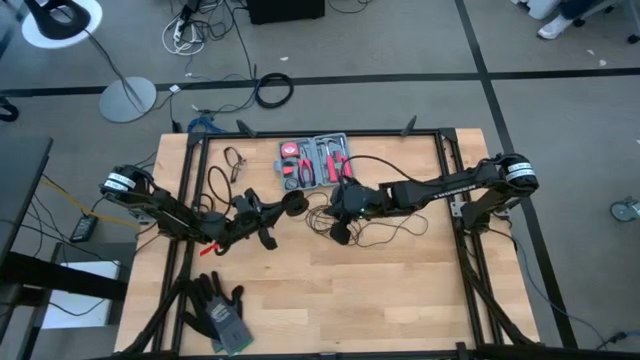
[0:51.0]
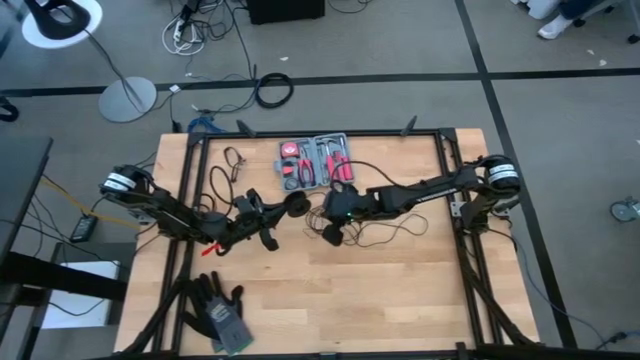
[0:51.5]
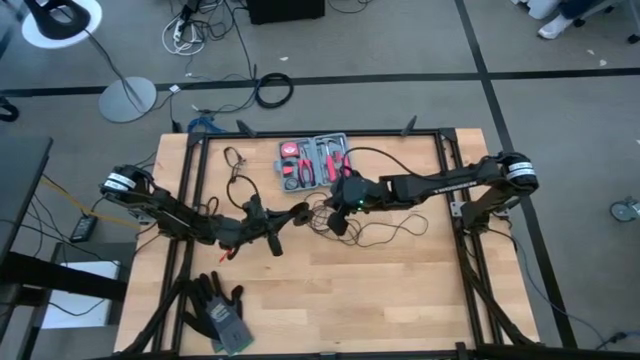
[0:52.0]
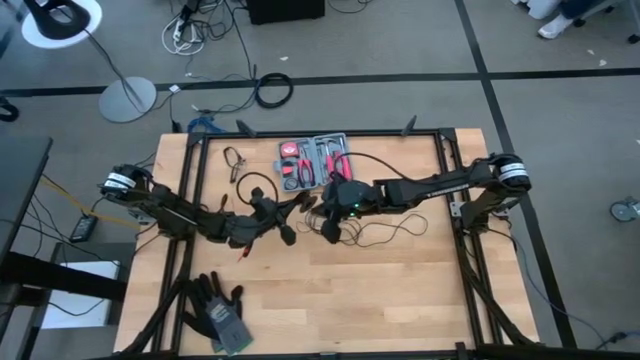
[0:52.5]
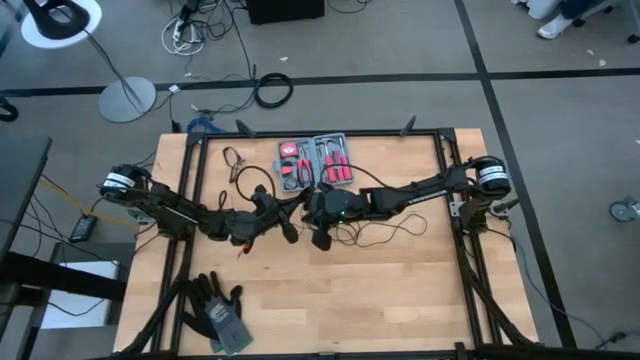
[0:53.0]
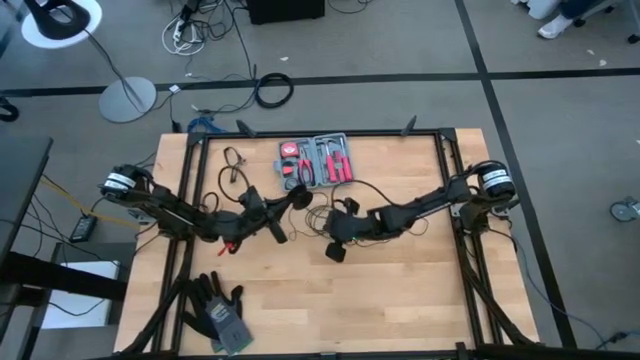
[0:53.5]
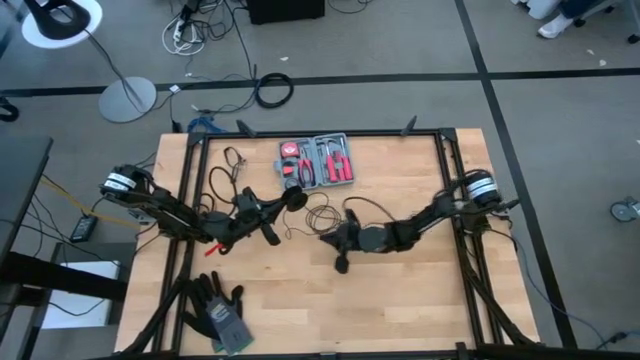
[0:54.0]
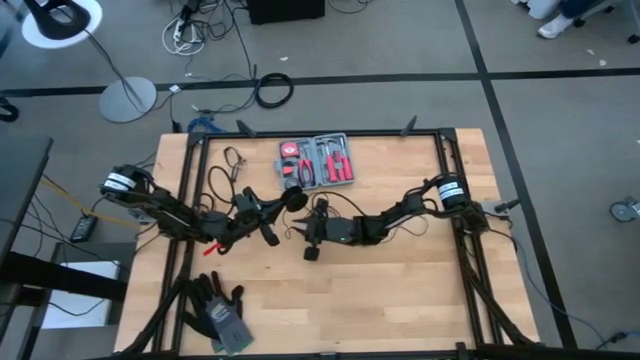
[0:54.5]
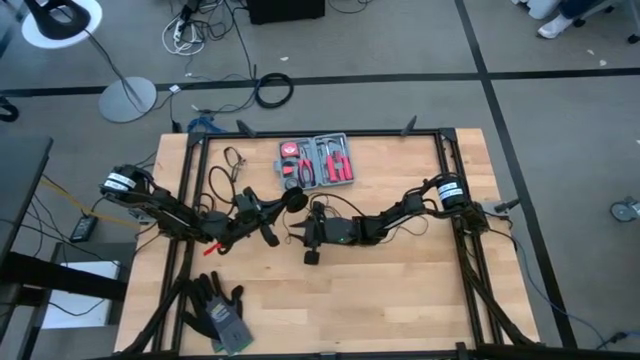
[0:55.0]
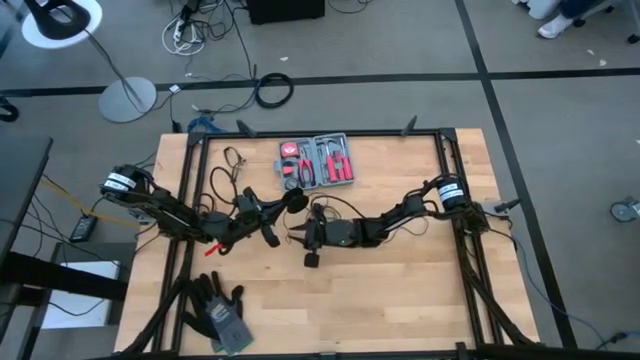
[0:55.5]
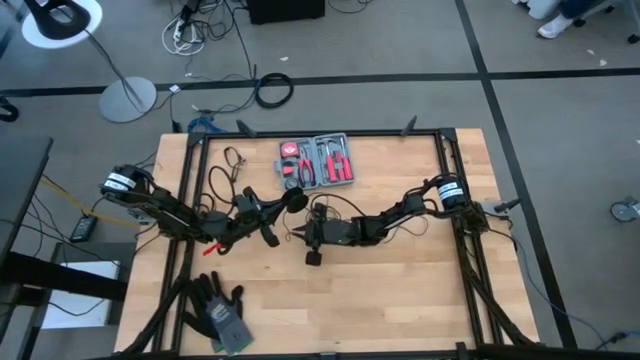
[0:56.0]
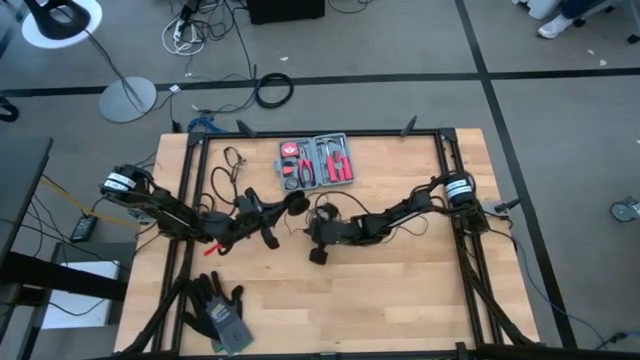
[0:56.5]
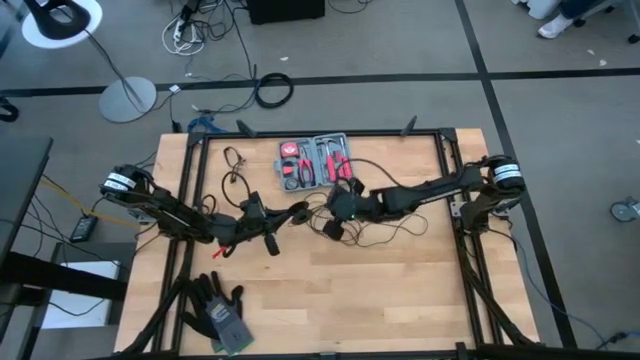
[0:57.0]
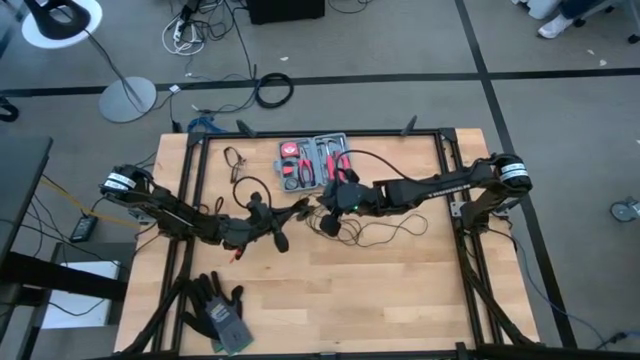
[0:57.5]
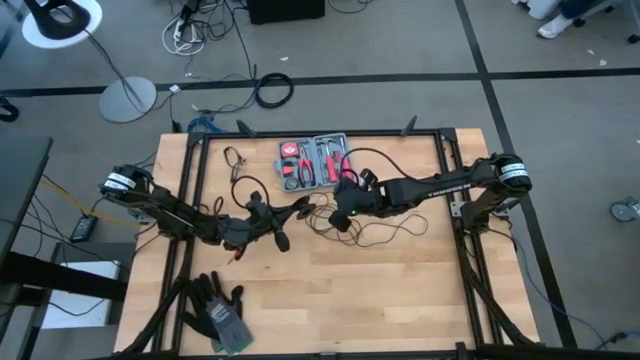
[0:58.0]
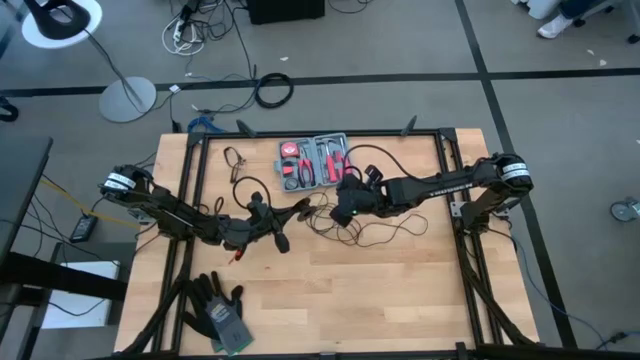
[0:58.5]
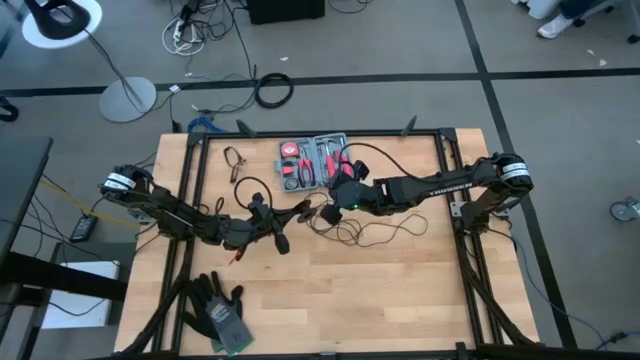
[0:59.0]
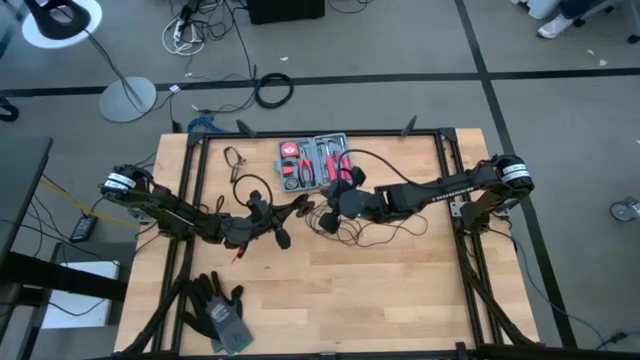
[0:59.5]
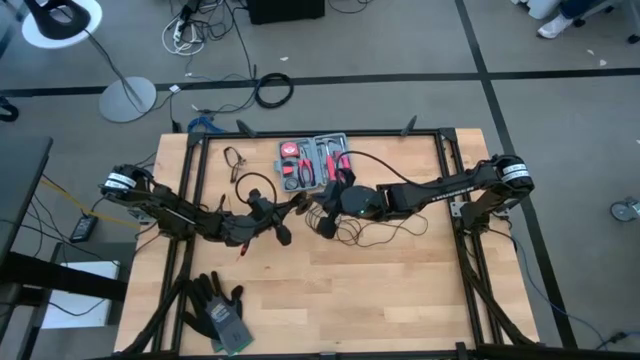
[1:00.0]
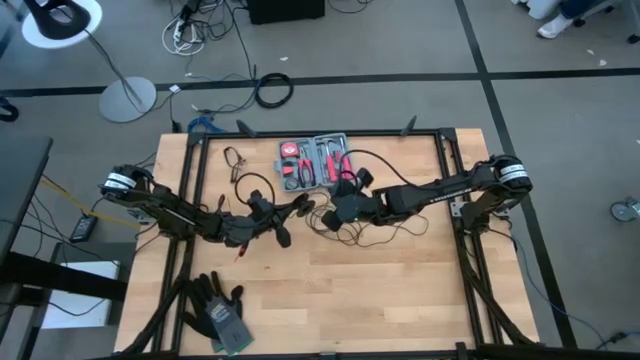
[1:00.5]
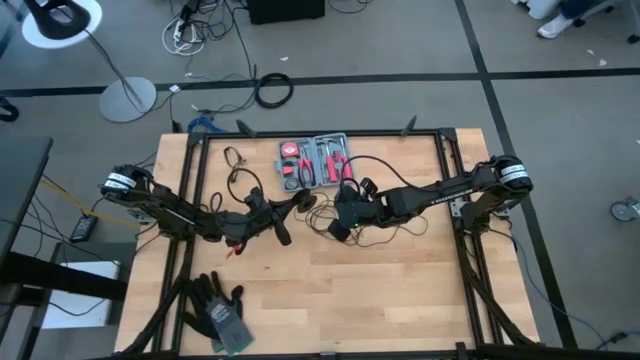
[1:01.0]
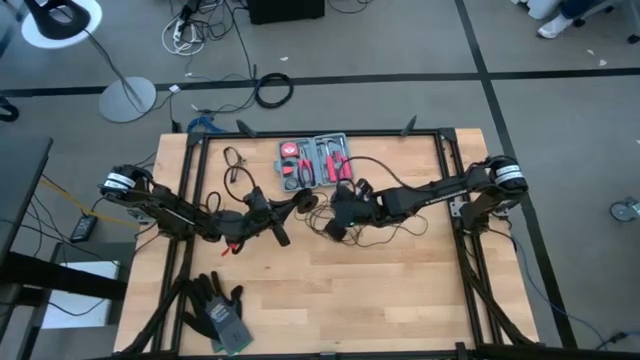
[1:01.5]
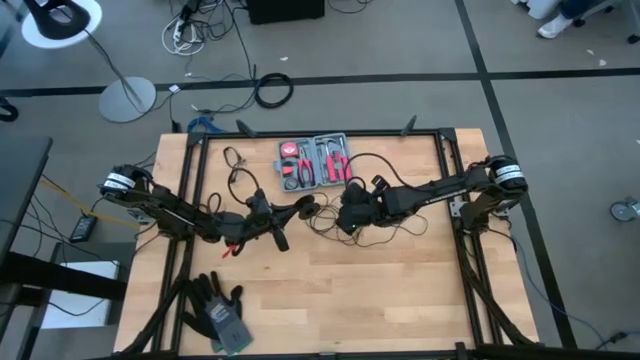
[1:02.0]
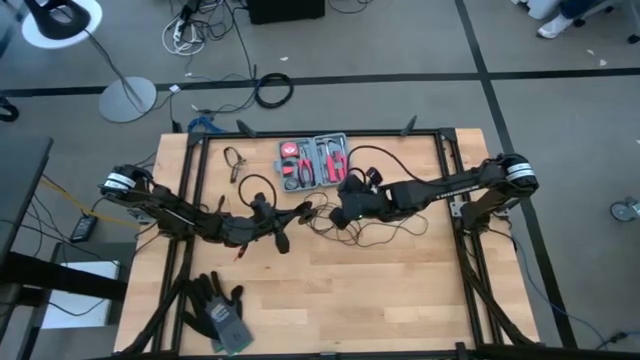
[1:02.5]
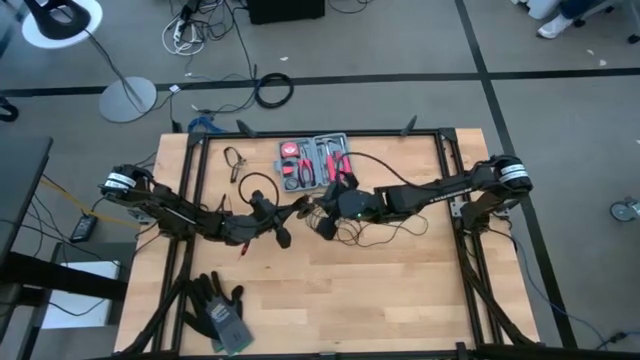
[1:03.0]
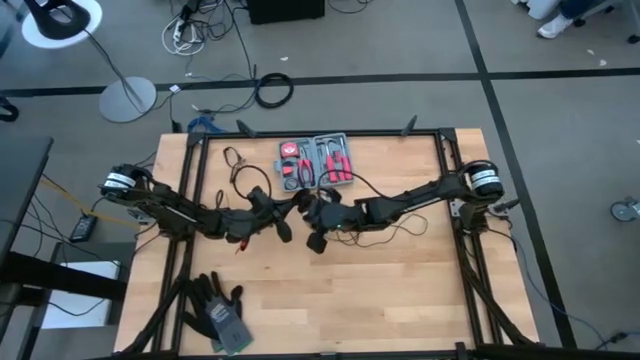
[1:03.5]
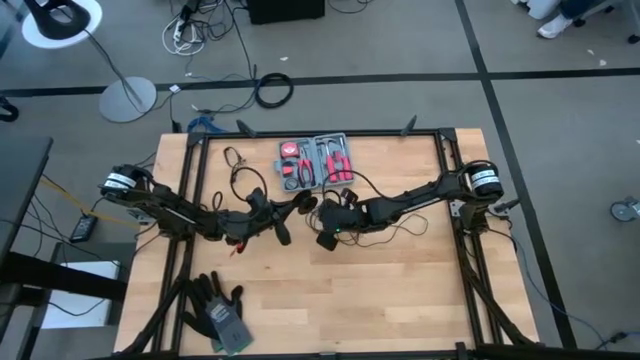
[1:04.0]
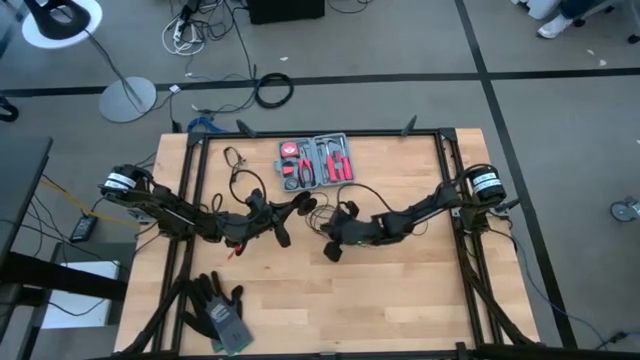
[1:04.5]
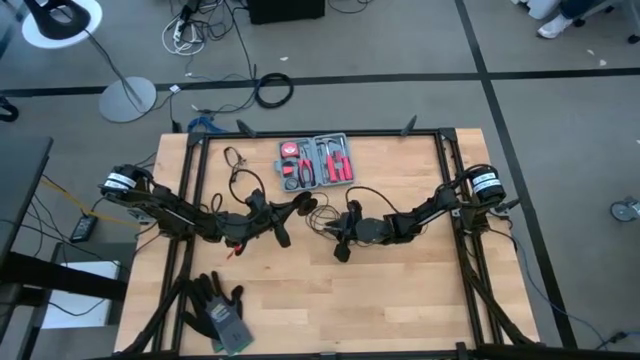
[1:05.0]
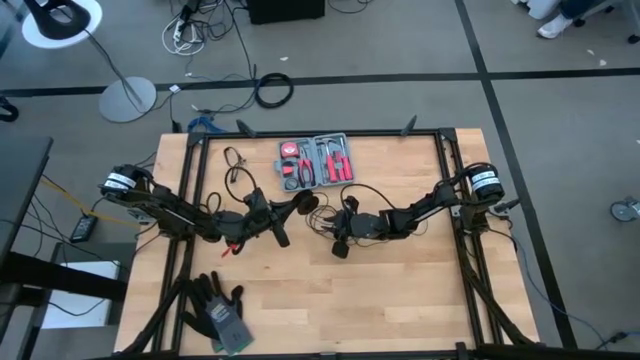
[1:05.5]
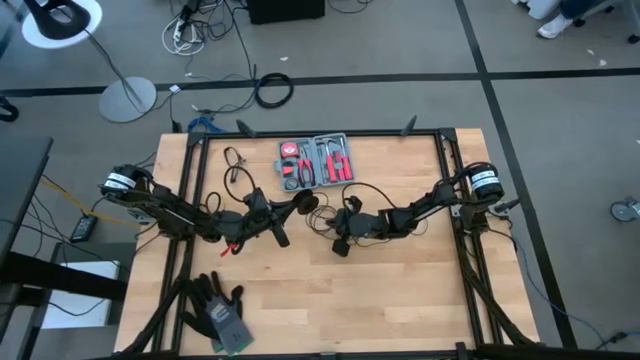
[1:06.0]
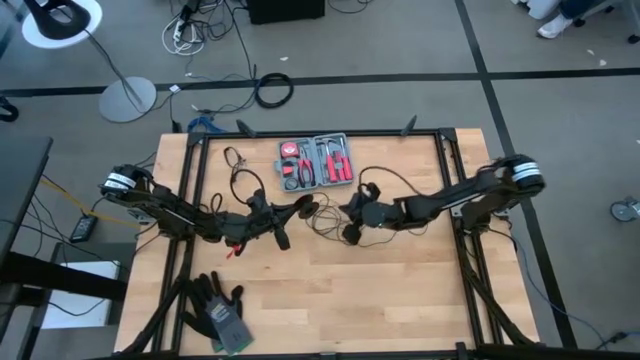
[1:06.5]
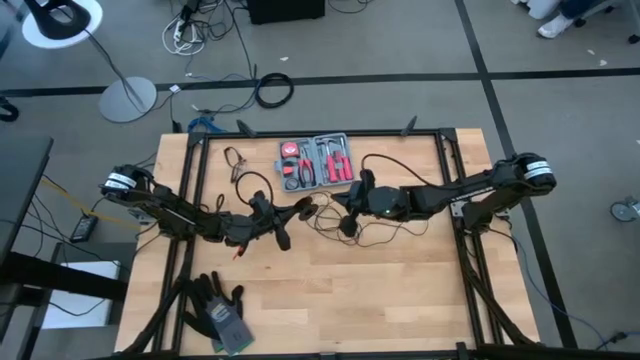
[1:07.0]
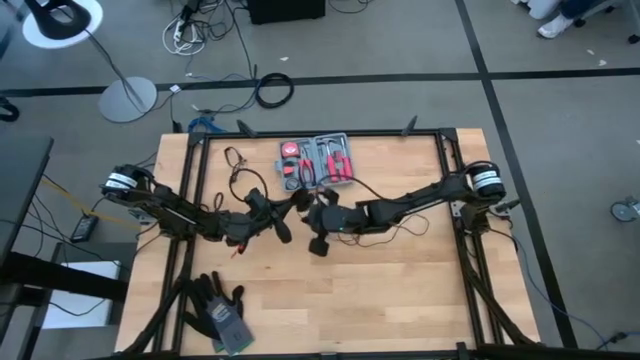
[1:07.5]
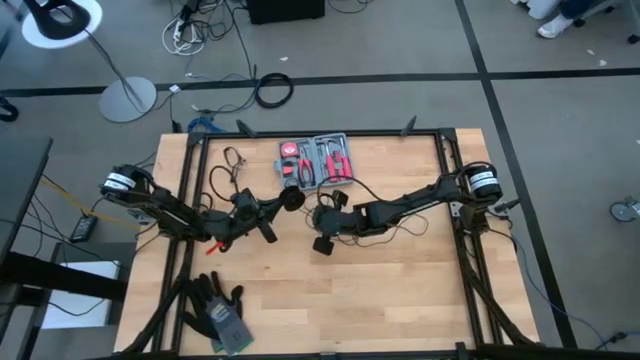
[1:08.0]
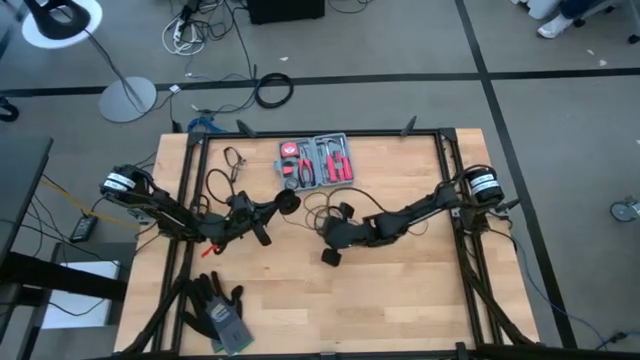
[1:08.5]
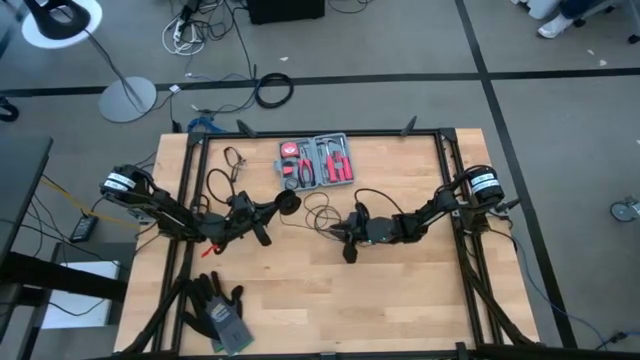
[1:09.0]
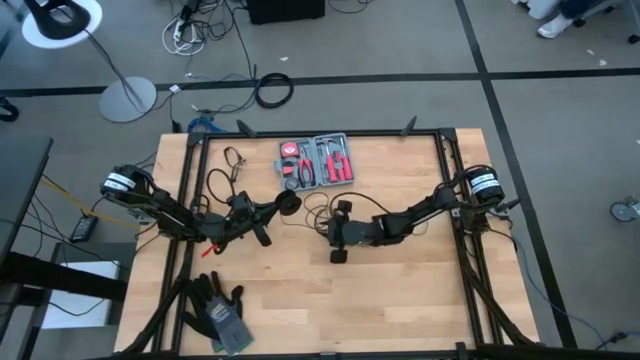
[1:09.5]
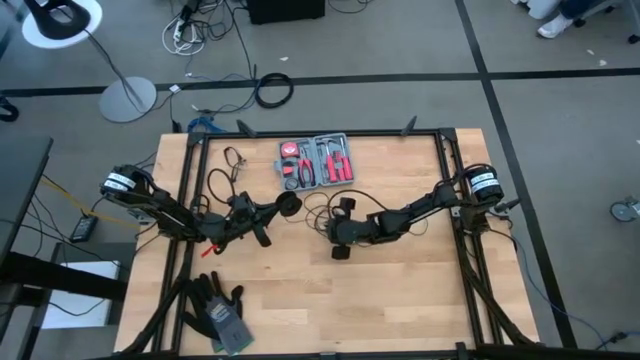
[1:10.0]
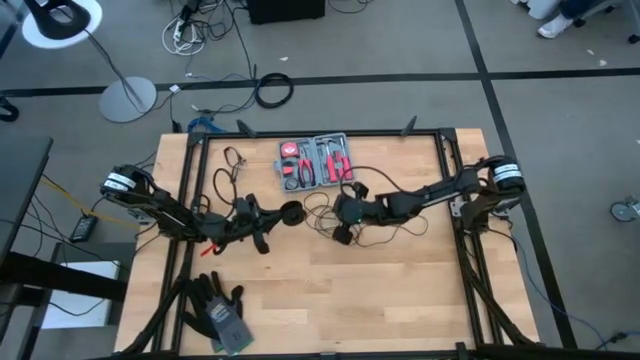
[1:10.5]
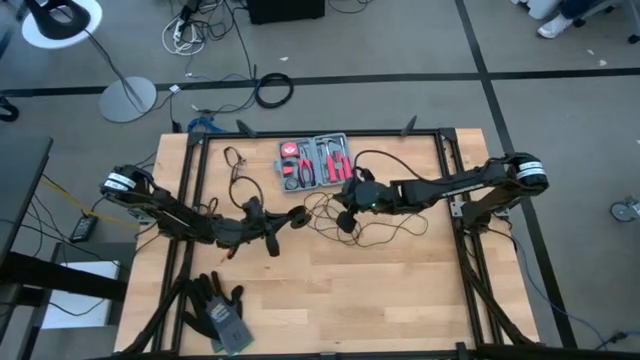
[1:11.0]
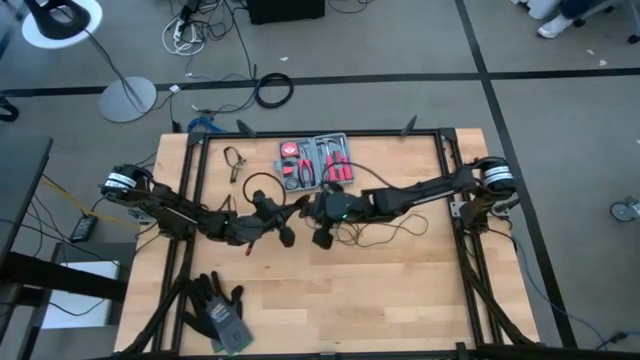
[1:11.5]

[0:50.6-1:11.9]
Task: Coil cords
Coil the black wire onto the black spool

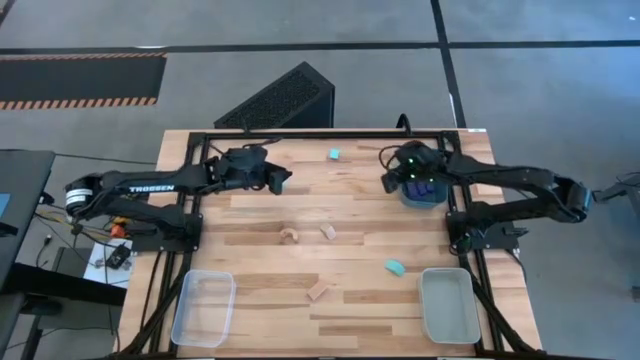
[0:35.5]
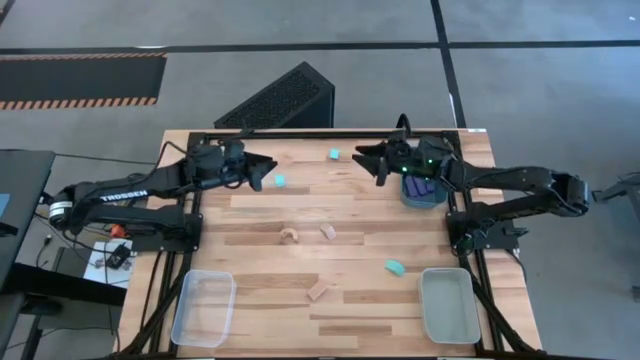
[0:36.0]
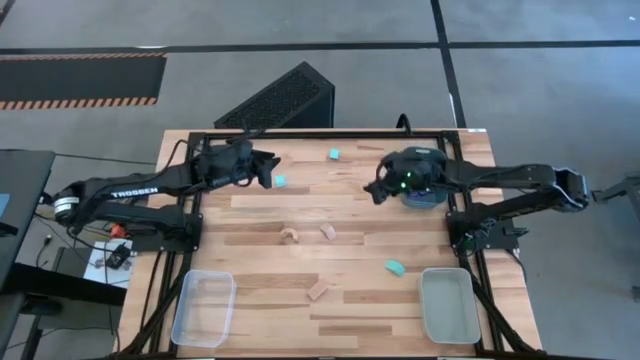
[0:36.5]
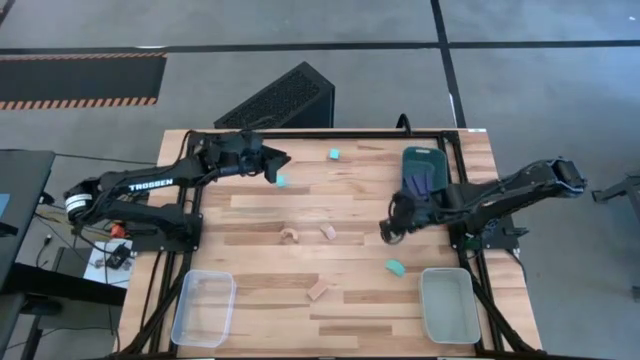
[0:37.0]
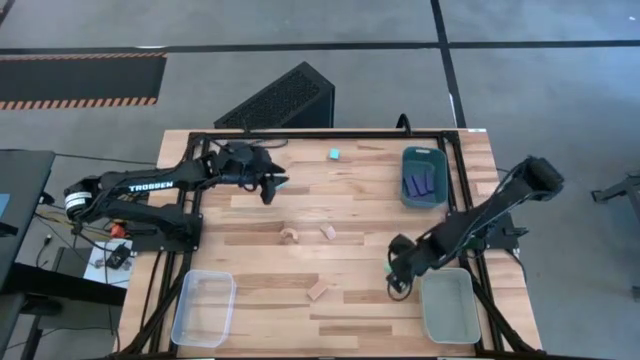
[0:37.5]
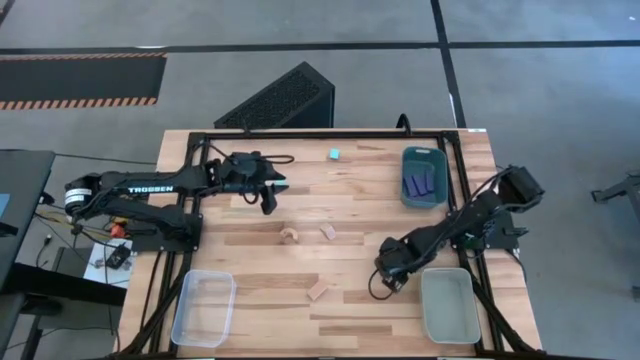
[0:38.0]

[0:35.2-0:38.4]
Task: Sort & place blocks by color
Put the light blue block into the transparent bin
